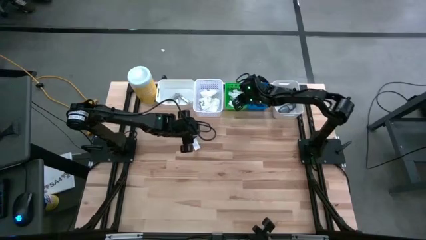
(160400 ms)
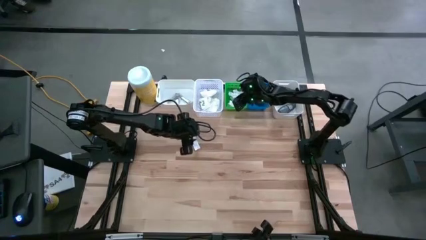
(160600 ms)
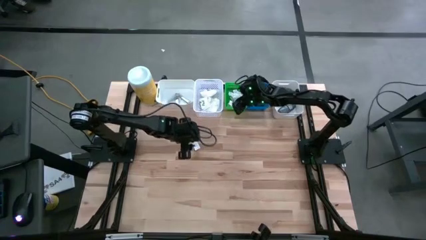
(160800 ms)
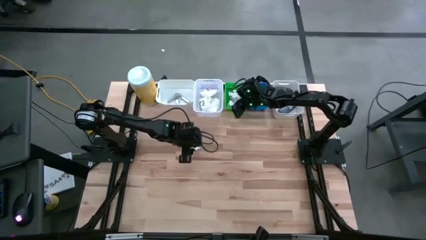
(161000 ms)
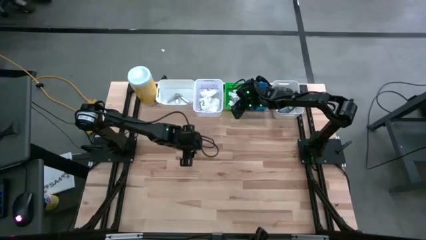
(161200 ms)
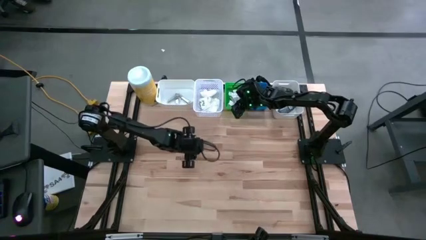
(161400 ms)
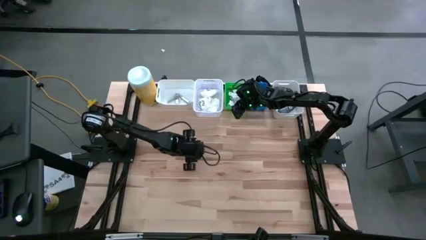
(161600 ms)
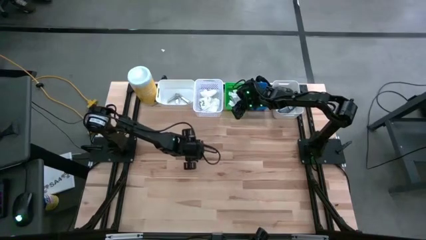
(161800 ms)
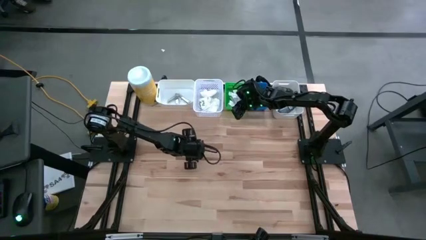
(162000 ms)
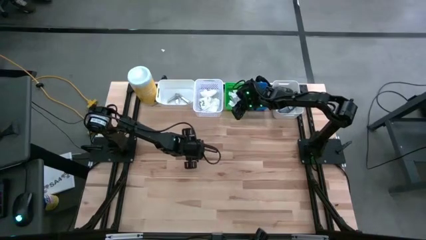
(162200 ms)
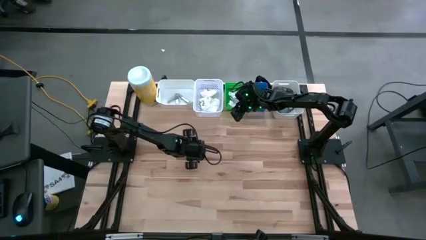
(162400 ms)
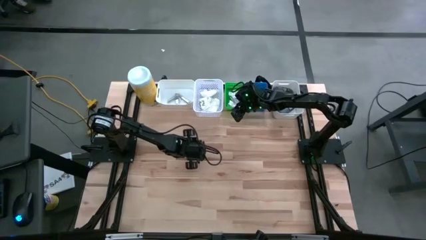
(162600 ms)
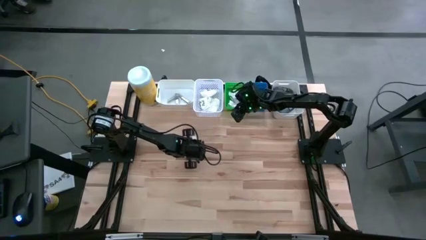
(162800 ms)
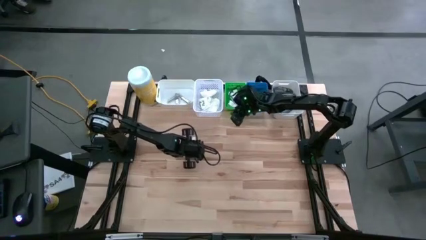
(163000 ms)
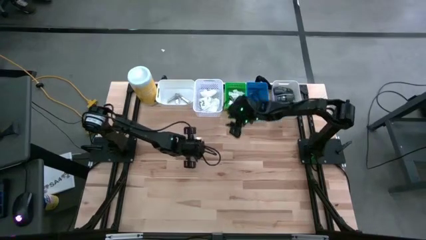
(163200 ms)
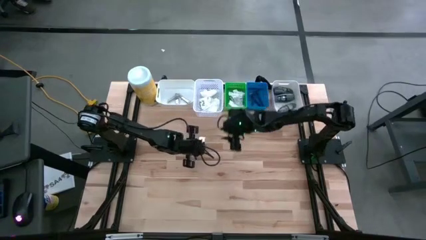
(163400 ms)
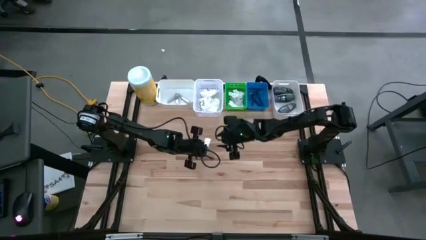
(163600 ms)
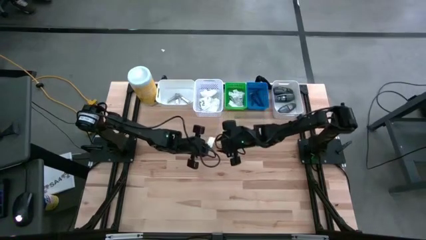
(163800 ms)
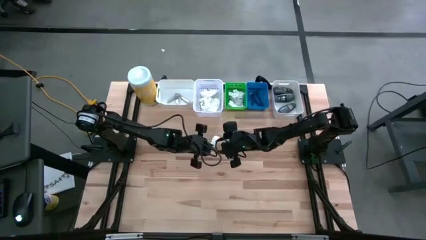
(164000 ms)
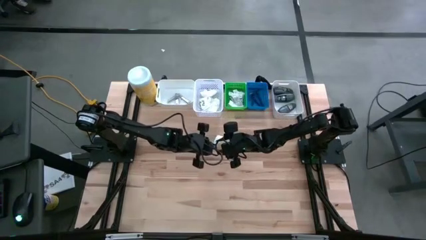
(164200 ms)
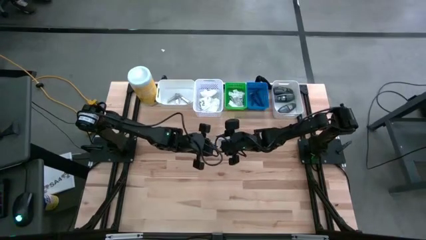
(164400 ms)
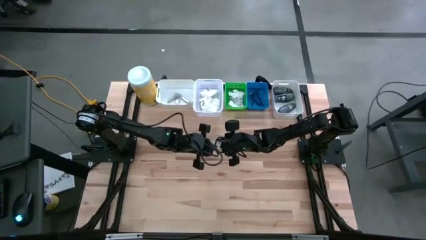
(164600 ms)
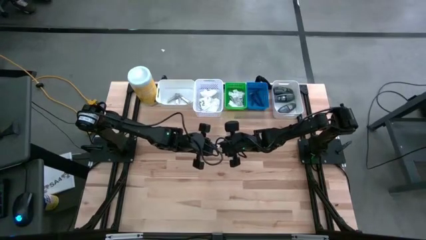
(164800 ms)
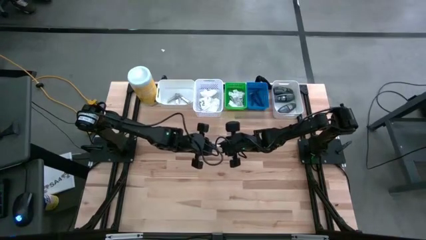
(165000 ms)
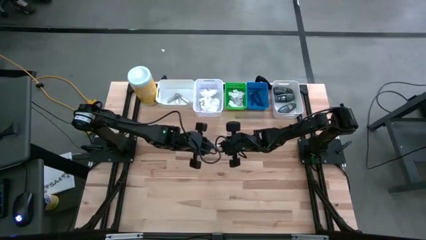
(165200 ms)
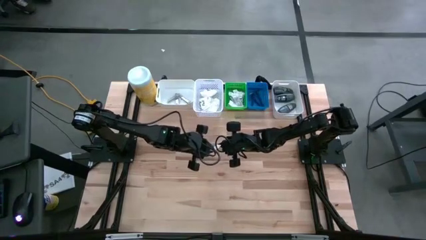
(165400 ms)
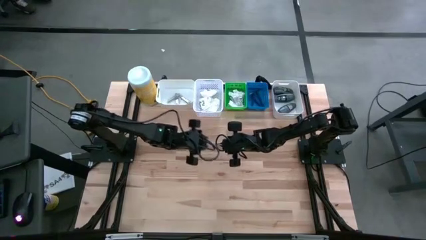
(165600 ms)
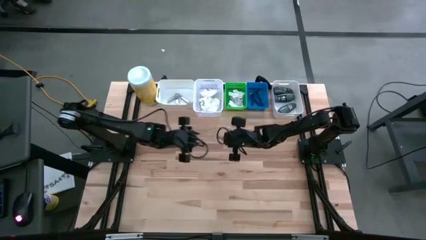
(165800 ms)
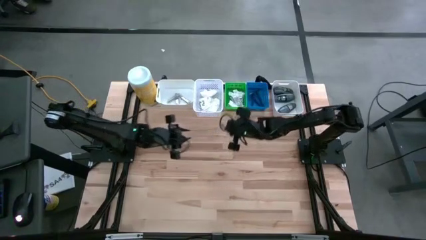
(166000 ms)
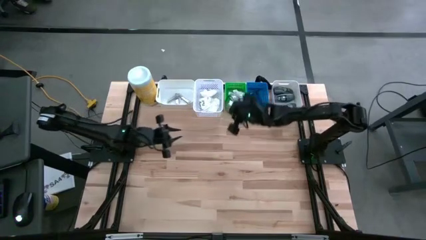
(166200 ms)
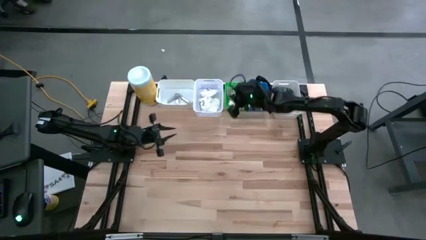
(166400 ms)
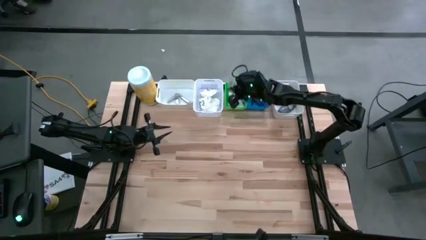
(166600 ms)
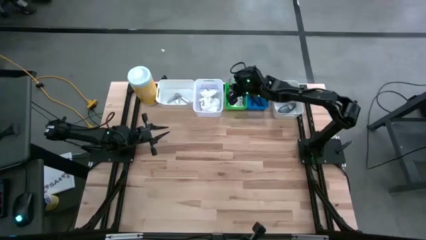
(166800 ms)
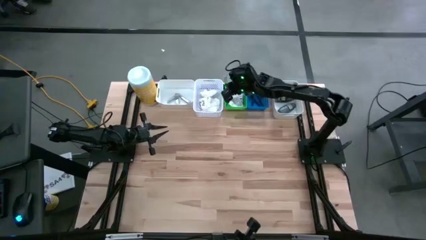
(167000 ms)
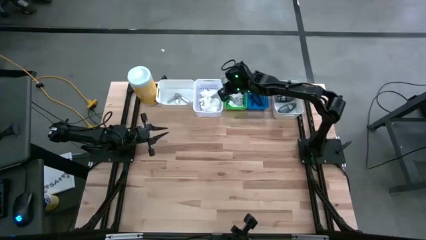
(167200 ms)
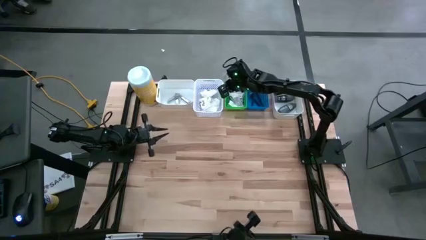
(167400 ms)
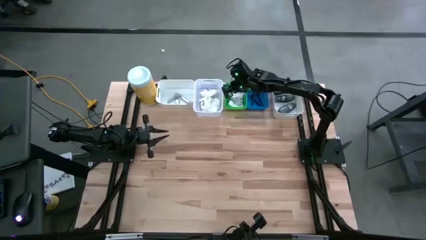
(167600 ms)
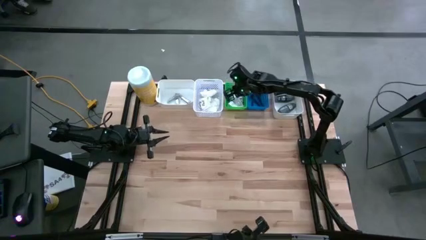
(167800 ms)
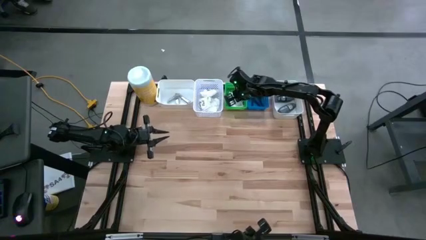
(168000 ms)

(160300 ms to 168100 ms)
Task: Pick & Place Travel size toiletries
Put the white bandage into the green bin

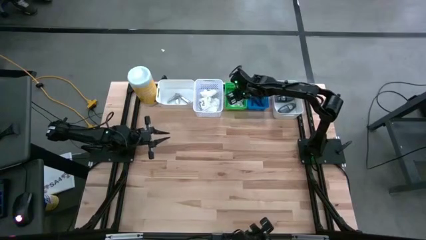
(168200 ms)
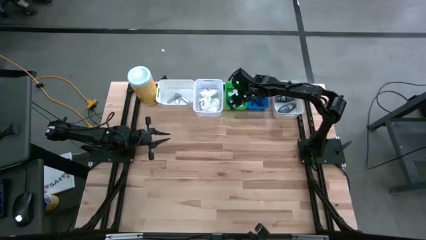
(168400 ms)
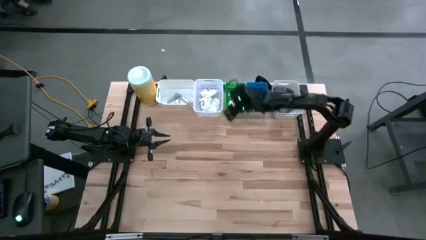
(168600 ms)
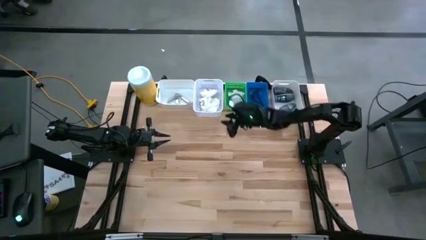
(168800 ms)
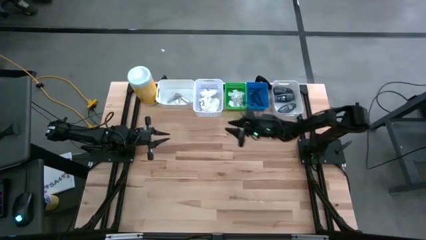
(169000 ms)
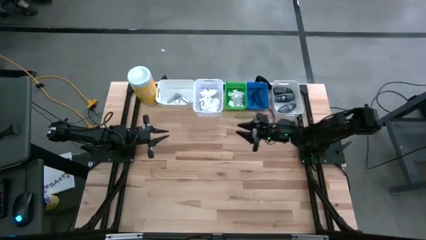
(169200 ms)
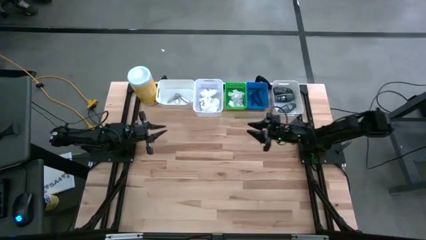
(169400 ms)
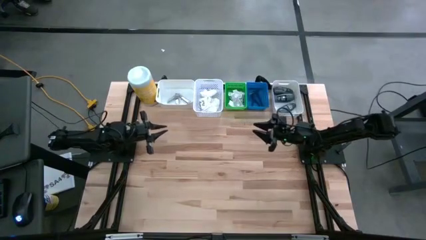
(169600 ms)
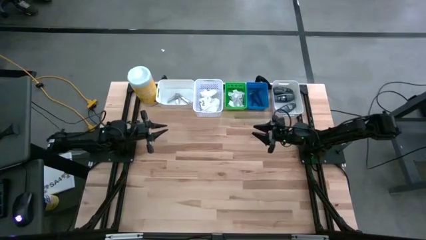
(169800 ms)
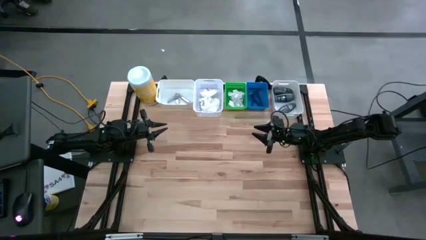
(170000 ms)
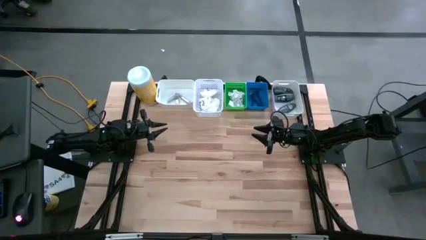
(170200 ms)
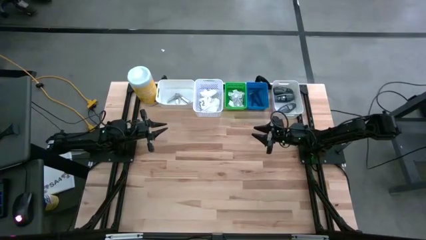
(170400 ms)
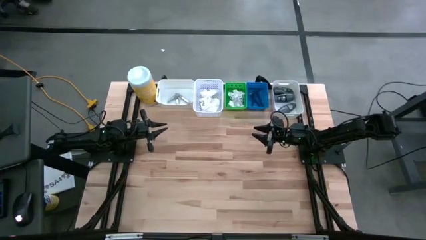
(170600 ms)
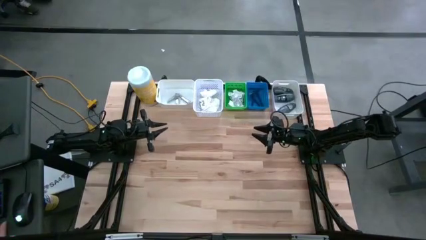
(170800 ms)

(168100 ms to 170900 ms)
Return to Home Position

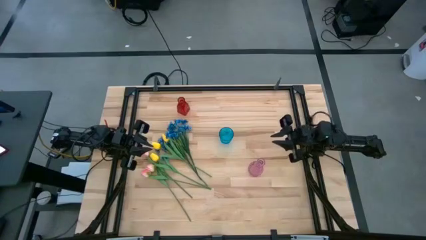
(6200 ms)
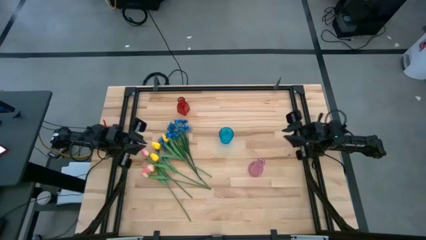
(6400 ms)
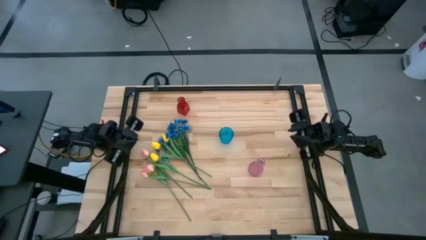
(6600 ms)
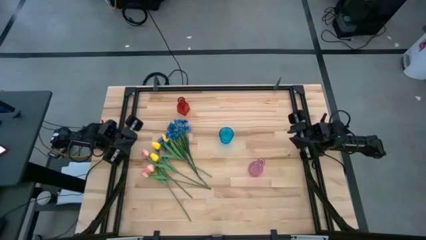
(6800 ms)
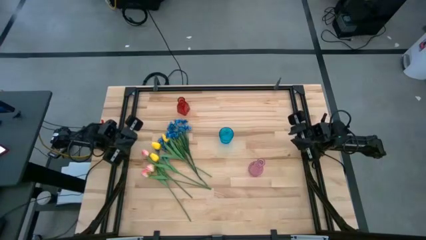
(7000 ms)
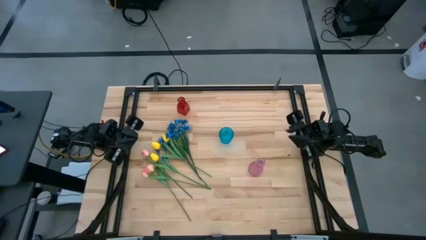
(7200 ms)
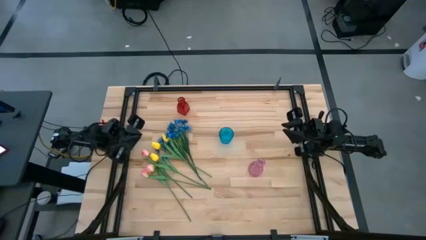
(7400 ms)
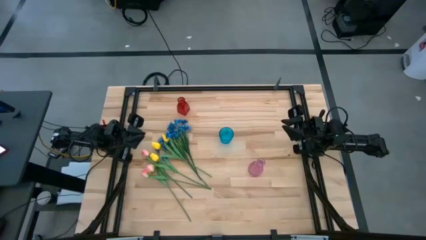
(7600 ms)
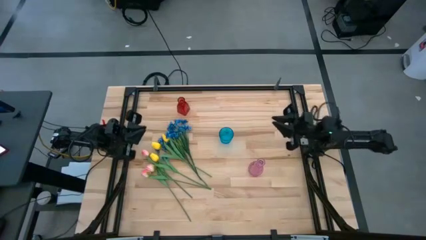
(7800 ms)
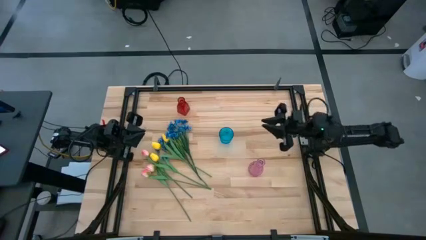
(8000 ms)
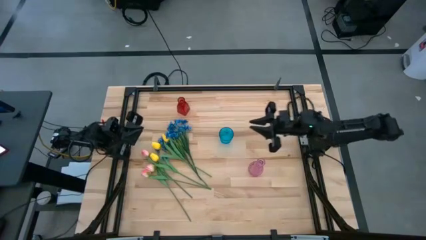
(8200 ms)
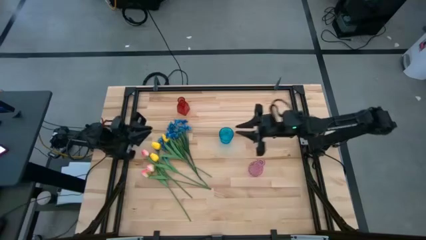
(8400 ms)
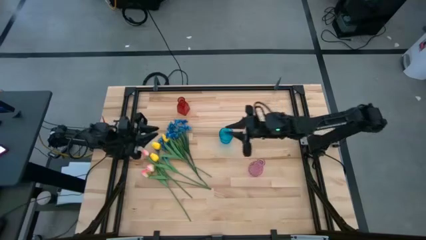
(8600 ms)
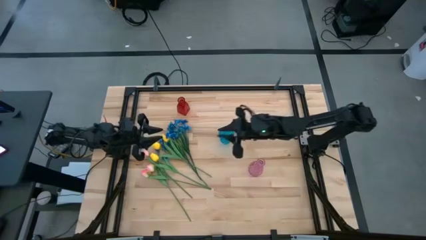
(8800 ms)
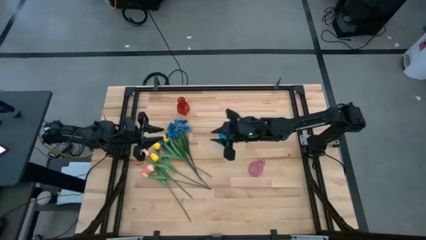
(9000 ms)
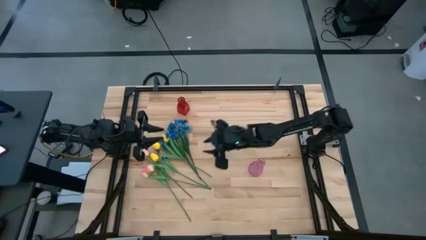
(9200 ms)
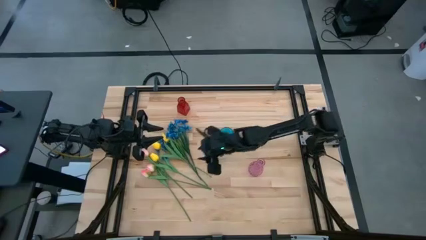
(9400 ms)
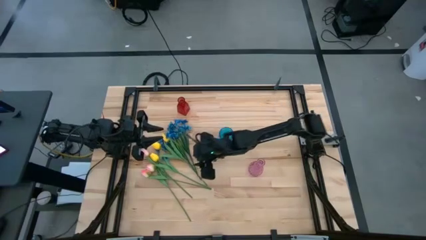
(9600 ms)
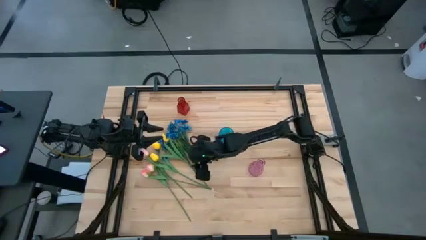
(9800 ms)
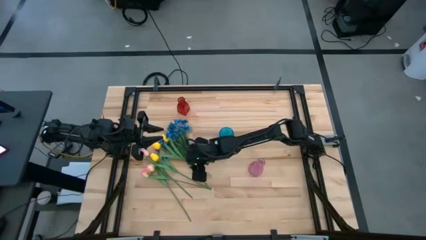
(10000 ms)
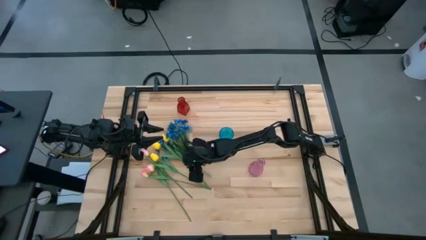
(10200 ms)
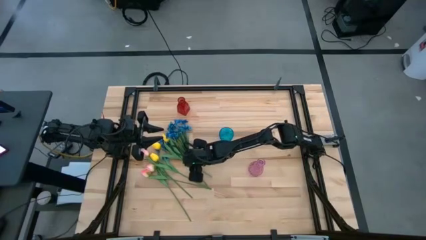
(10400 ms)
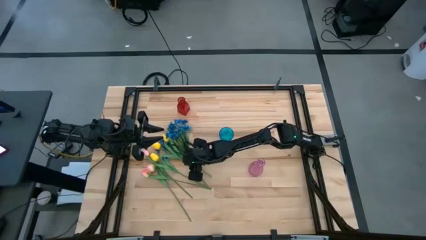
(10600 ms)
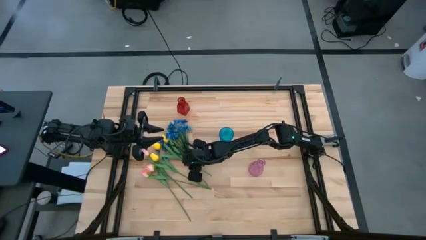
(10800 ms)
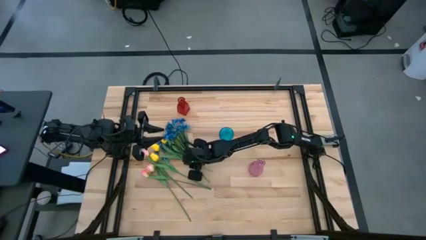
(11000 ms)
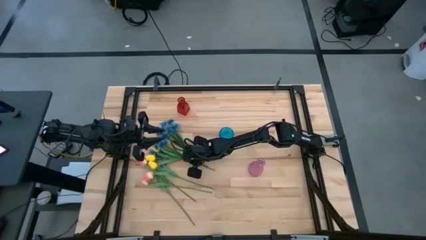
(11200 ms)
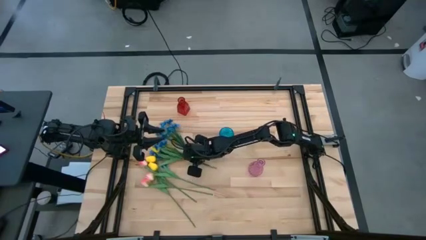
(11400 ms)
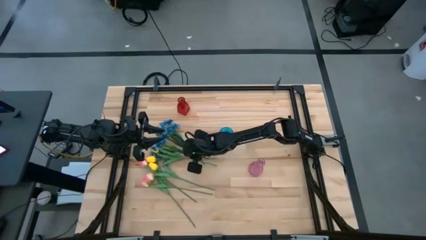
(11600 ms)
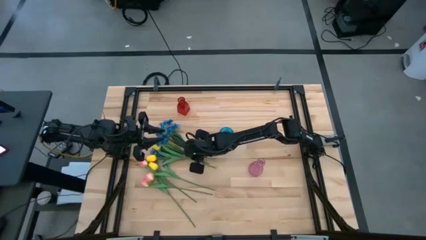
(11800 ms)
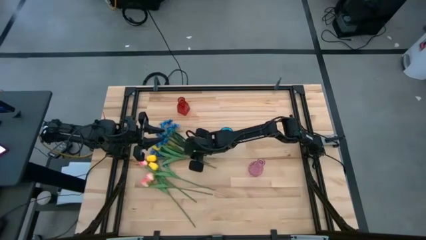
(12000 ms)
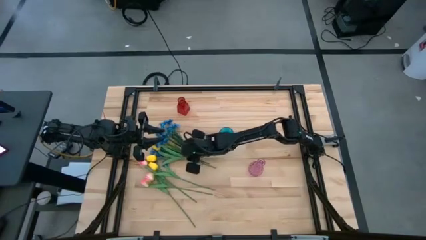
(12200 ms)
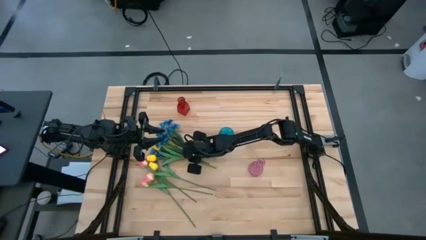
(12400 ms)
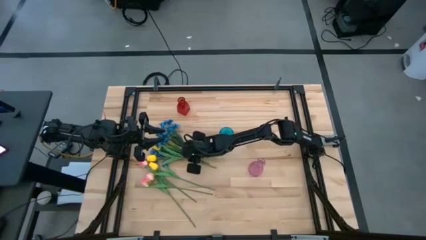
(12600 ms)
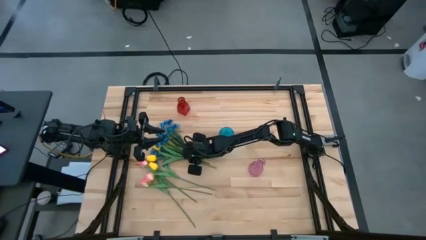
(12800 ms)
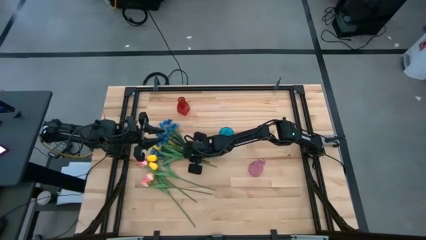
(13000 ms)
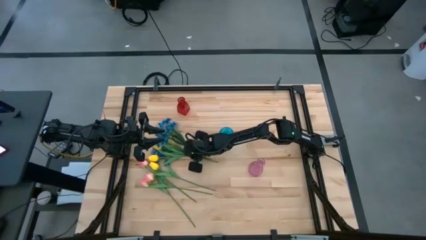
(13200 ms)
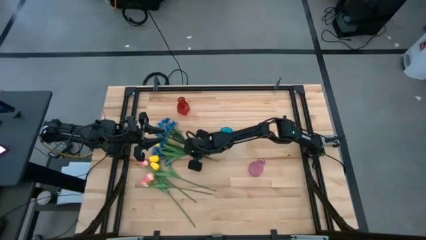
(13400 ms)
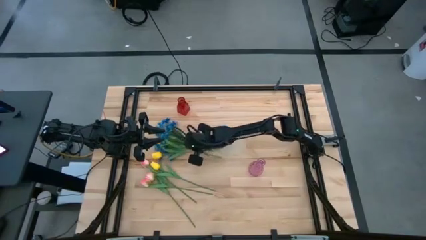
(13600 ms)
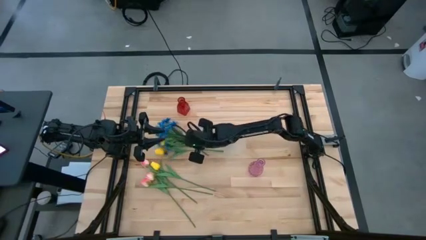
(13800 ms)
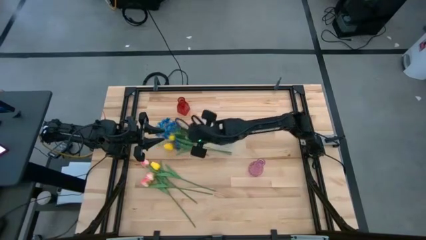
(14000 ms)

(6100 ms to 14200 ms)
Task: Sort flowers into vase by color
Put the left blue flower into the blue flower vase
